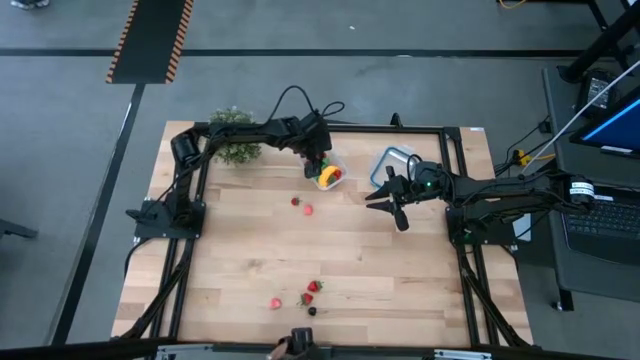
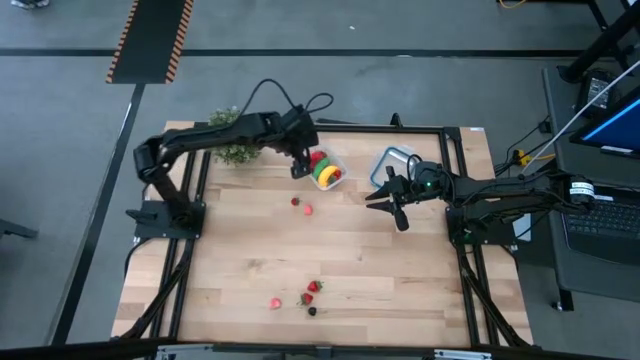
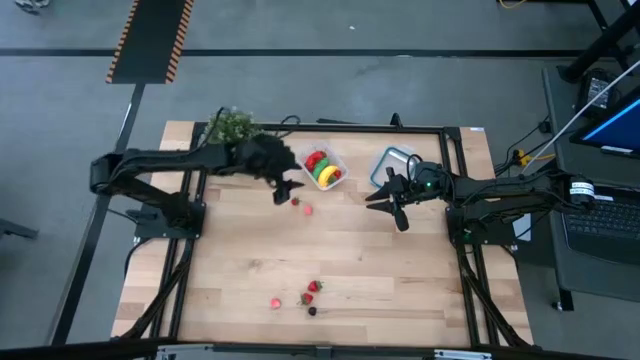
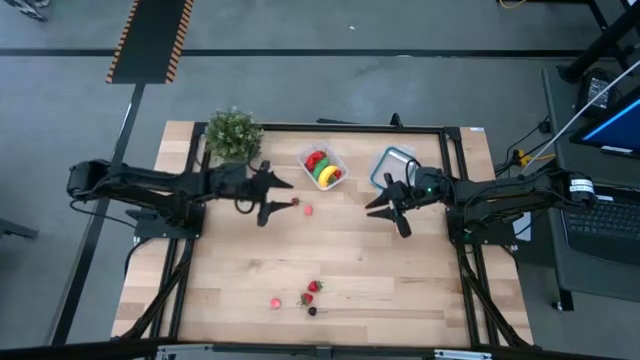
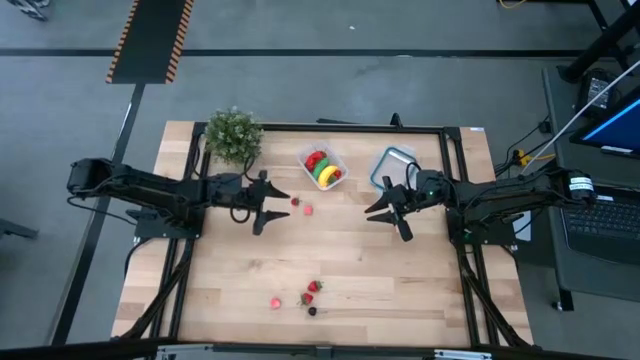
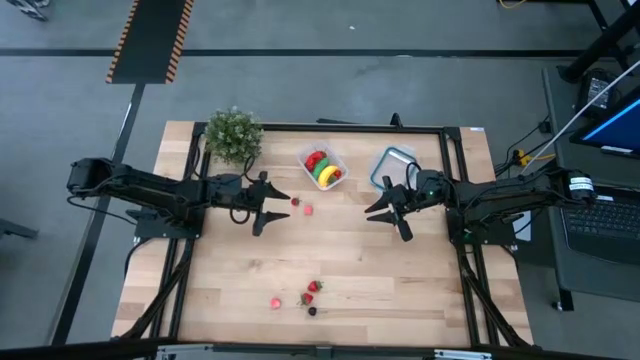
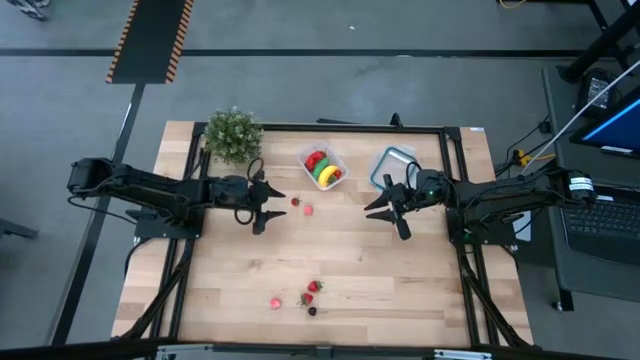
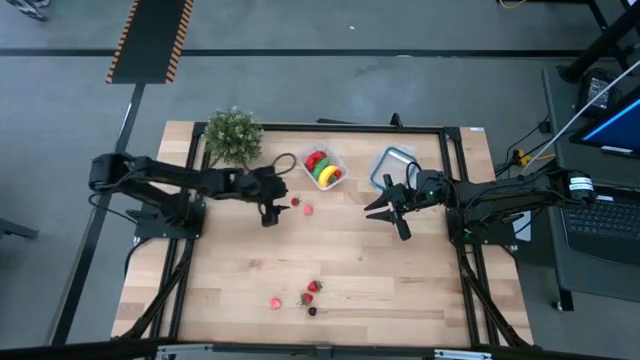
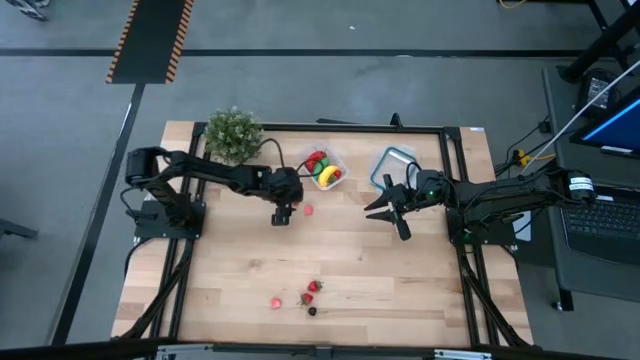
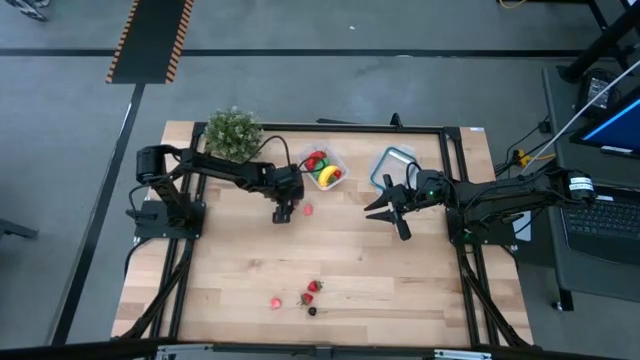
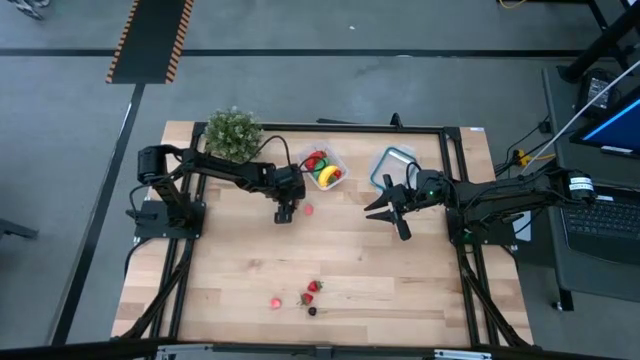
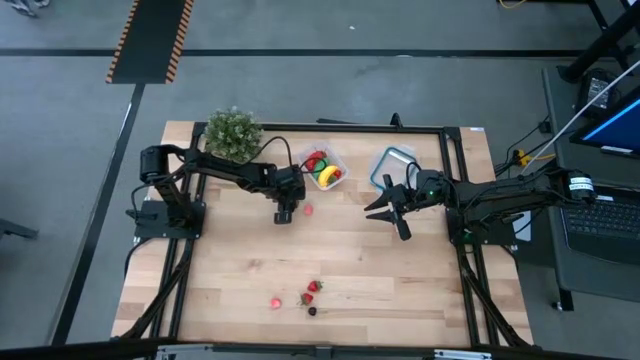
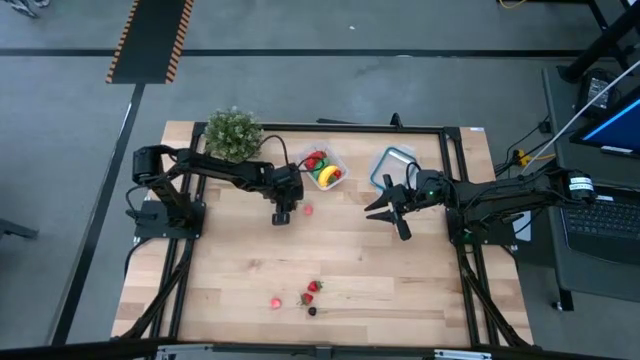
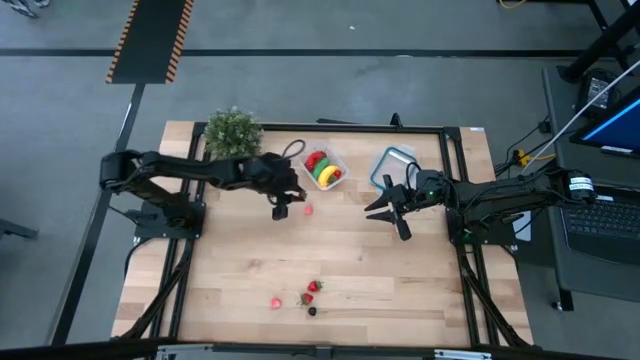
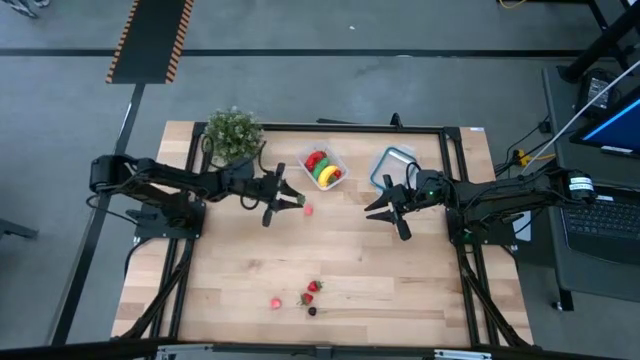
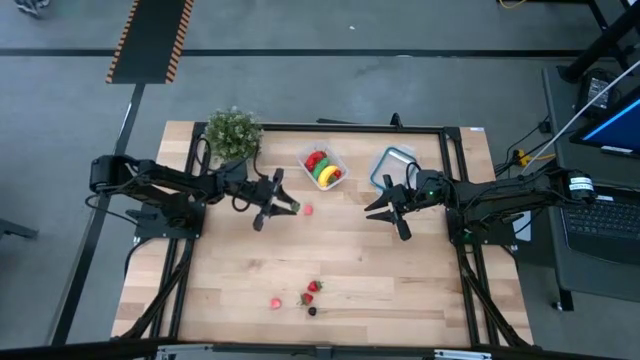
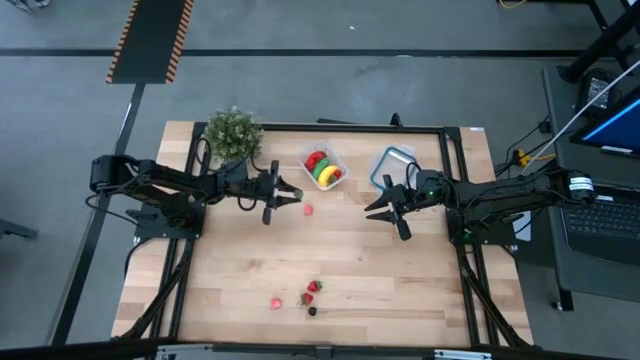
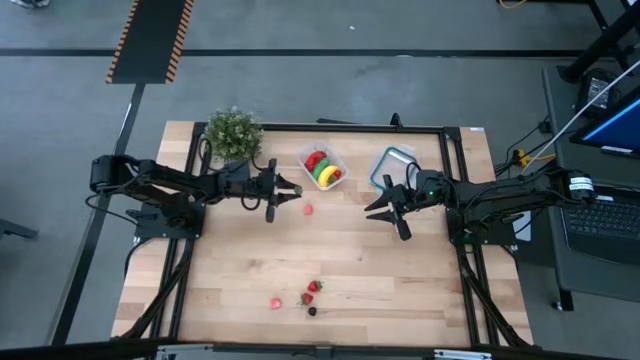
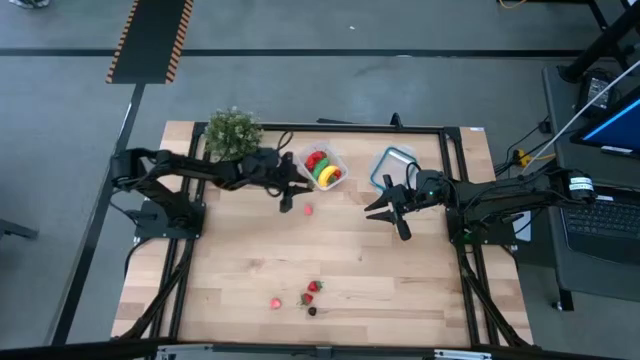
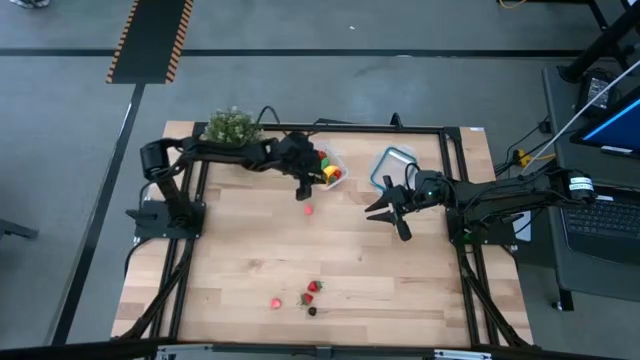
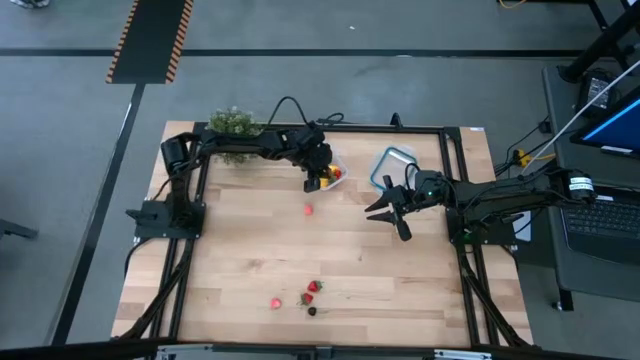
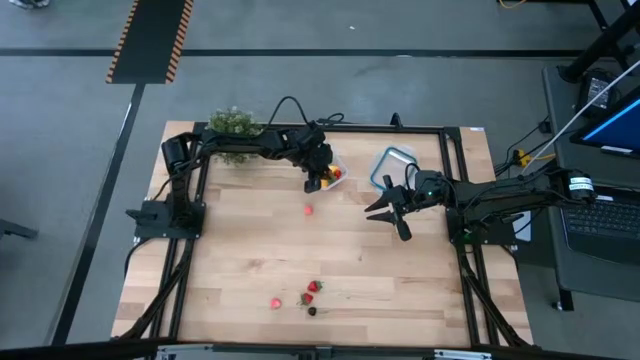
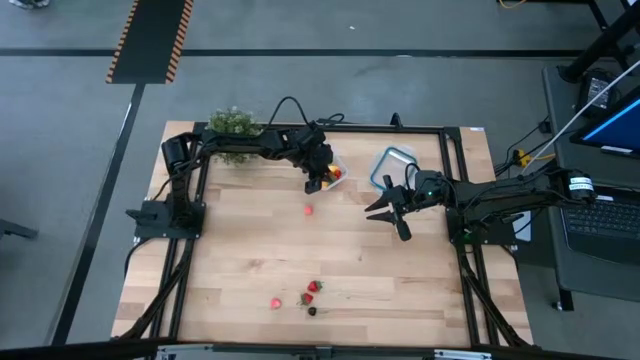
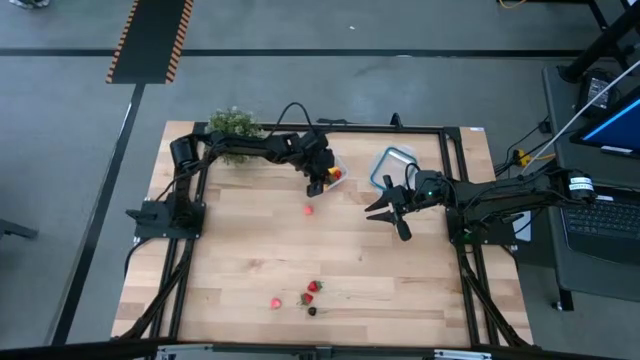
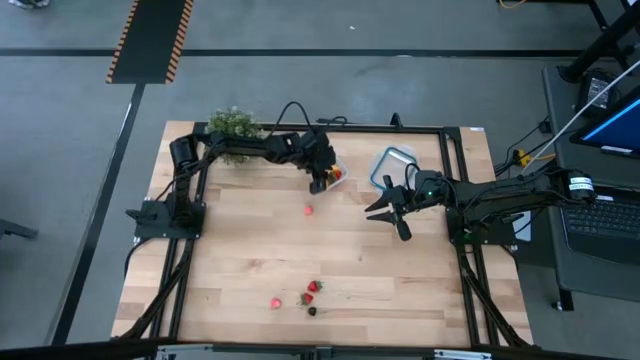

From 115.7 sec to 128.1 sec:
Task: Pick and placing Produce into tupperware
Put the top red strawberry into the transparent container

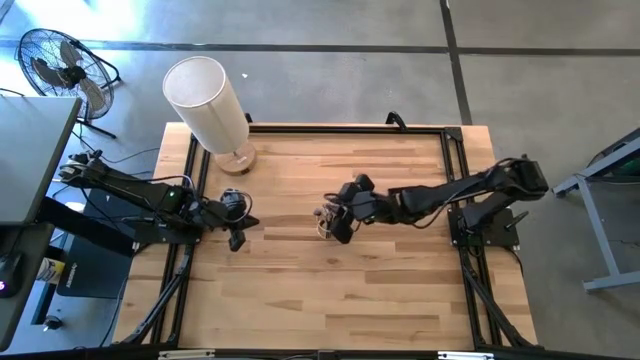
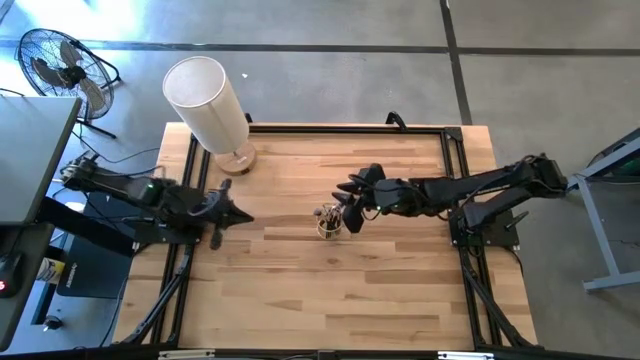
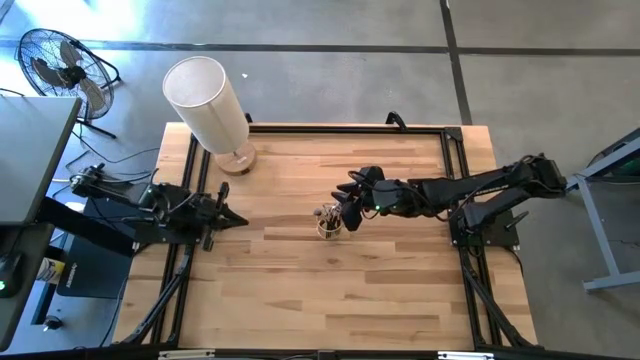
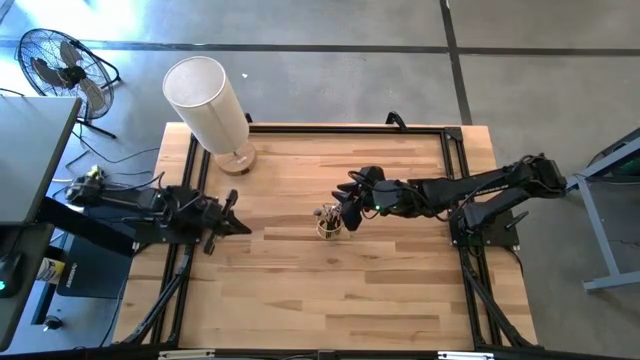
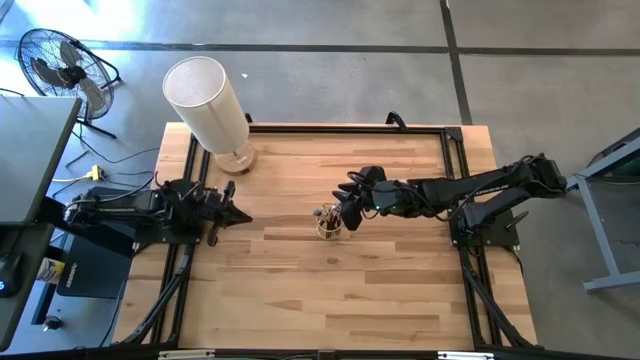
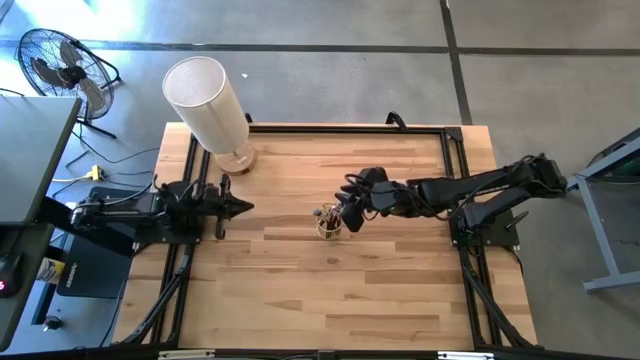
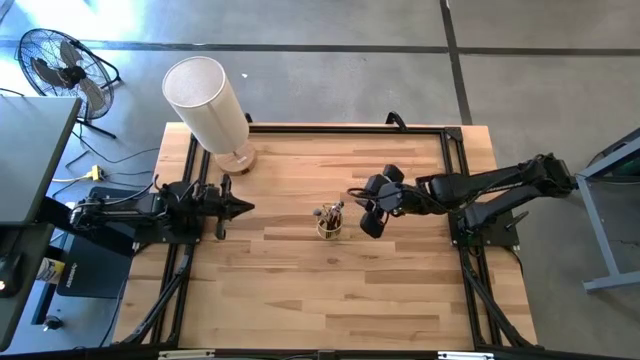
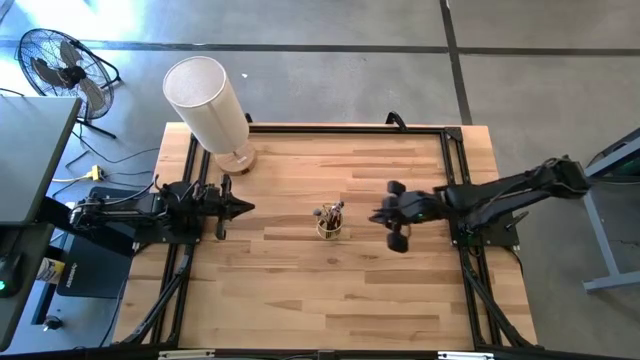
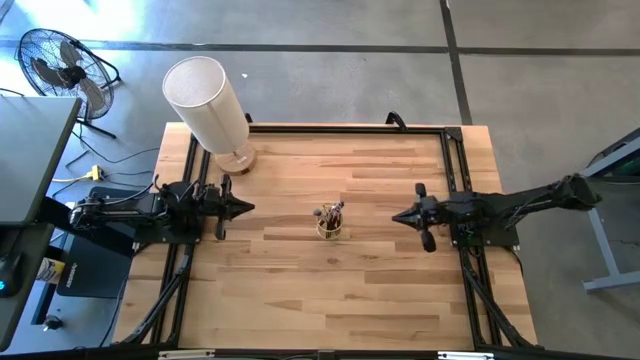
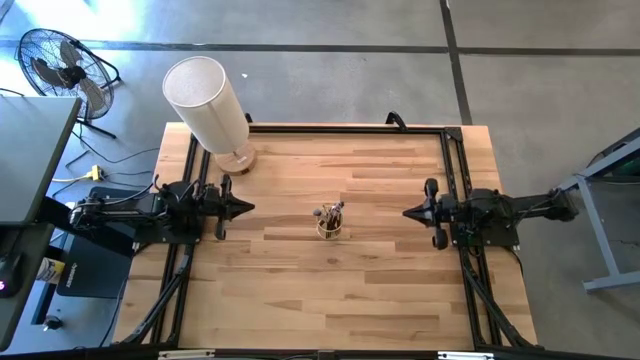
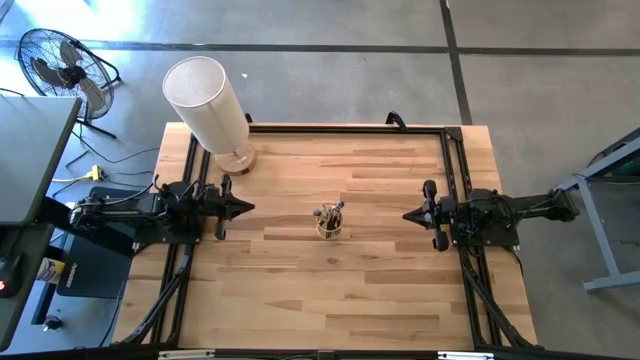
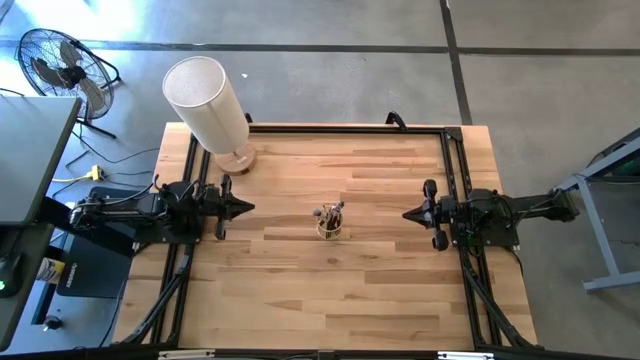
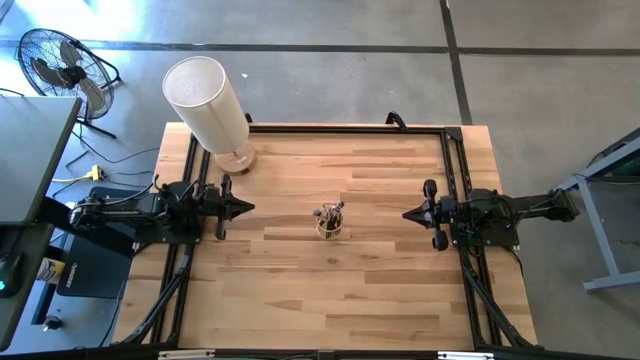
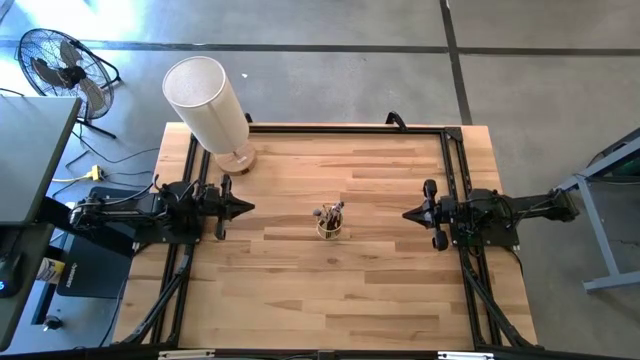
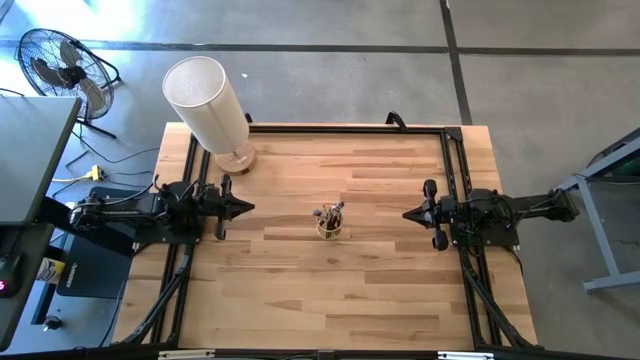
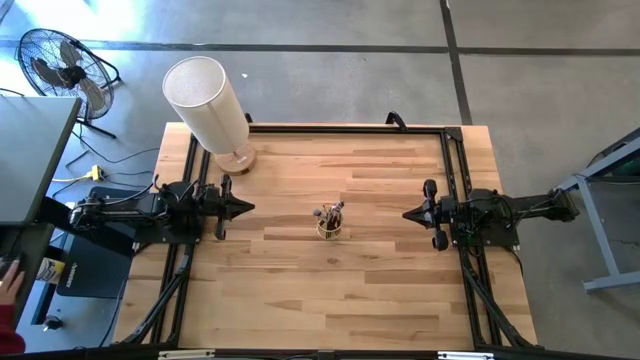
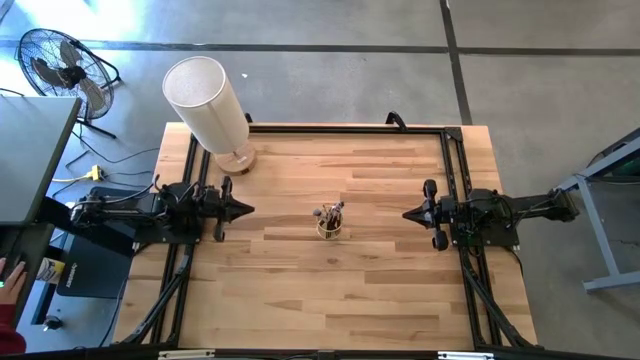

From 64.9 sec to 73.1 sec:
Task: Put items in baskets/containers
Return to Home Position
